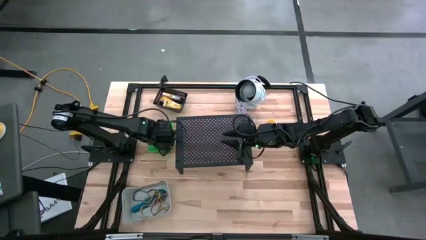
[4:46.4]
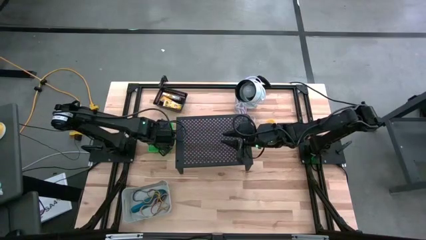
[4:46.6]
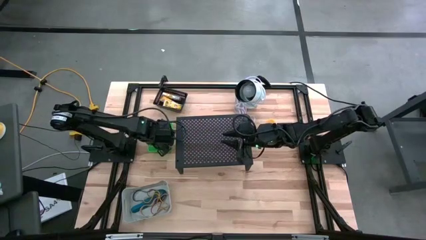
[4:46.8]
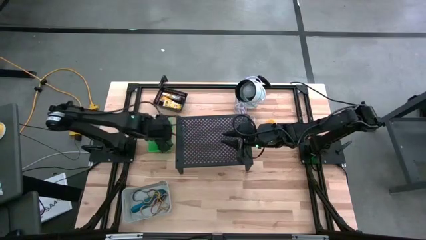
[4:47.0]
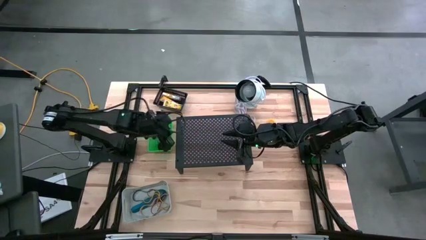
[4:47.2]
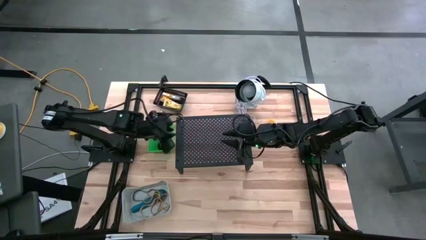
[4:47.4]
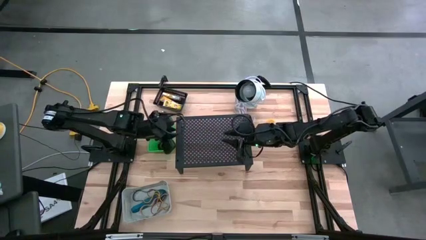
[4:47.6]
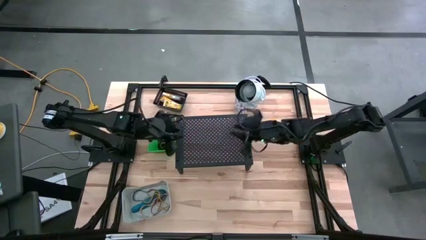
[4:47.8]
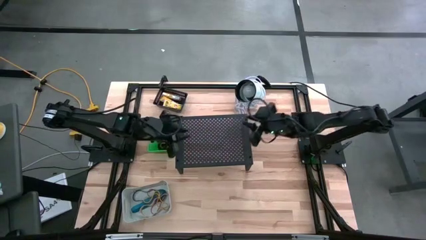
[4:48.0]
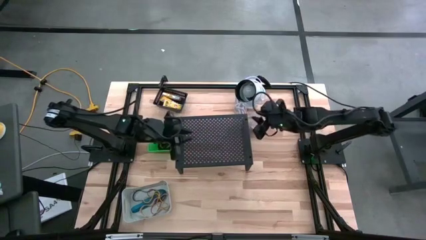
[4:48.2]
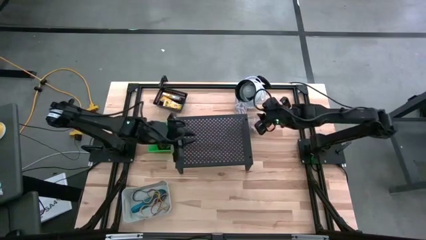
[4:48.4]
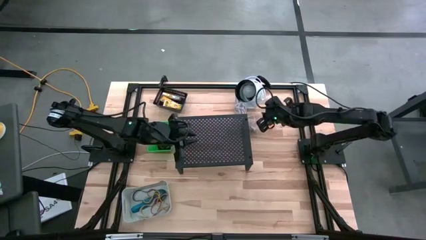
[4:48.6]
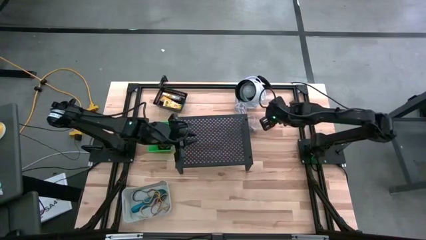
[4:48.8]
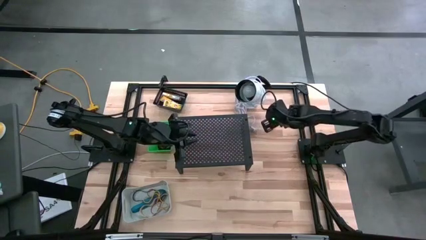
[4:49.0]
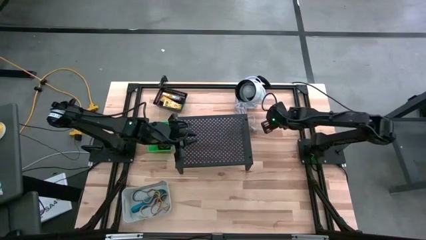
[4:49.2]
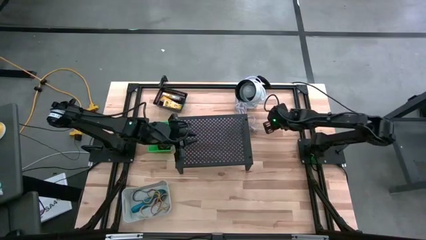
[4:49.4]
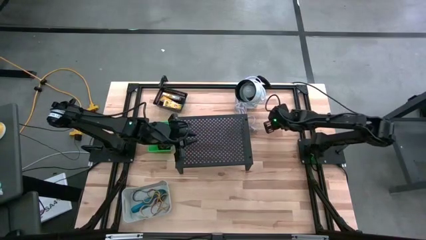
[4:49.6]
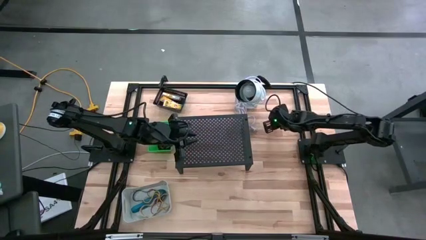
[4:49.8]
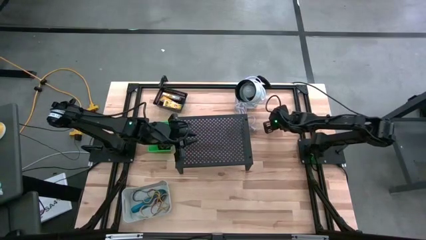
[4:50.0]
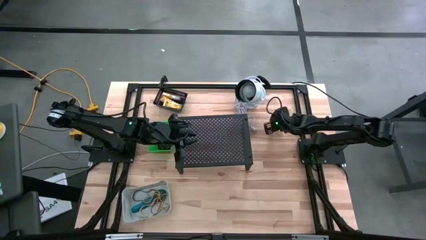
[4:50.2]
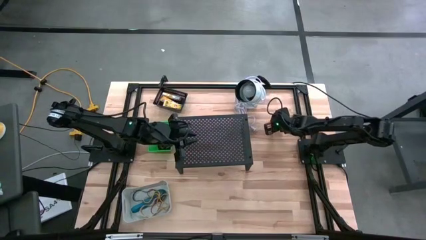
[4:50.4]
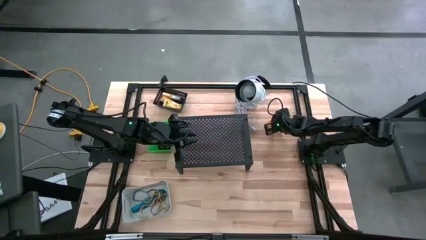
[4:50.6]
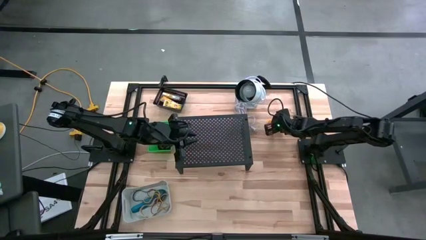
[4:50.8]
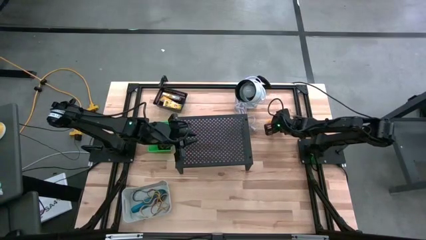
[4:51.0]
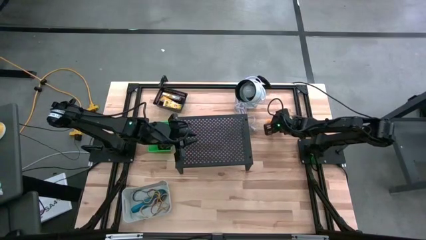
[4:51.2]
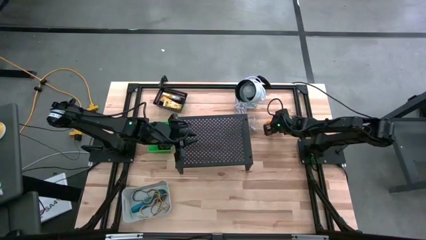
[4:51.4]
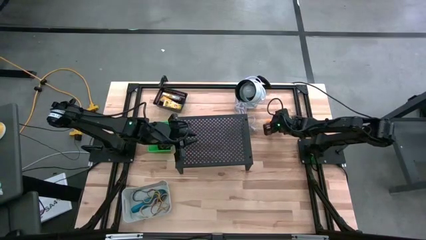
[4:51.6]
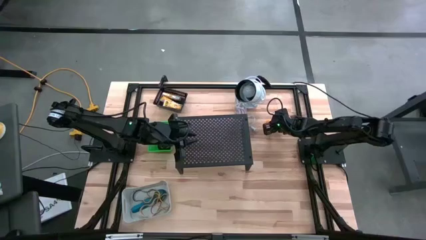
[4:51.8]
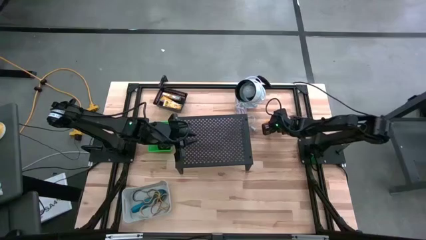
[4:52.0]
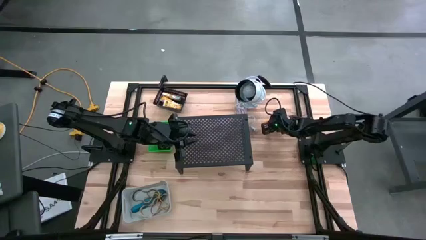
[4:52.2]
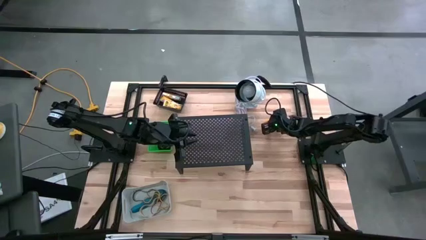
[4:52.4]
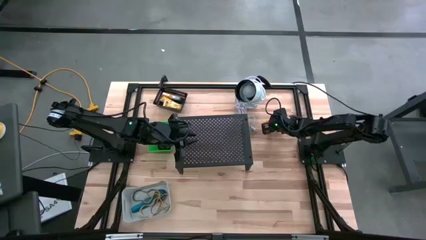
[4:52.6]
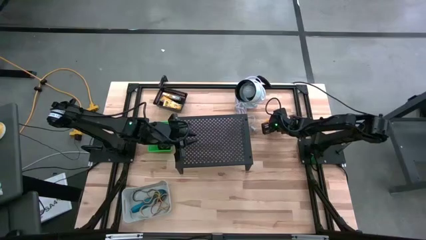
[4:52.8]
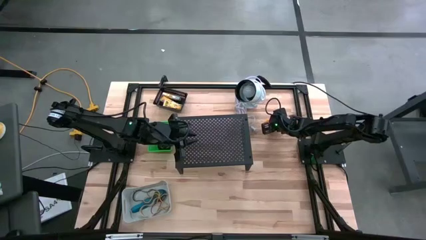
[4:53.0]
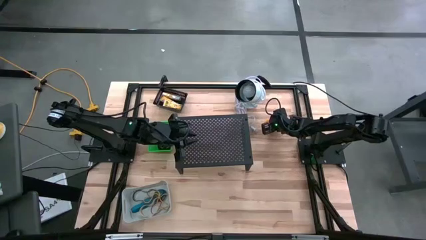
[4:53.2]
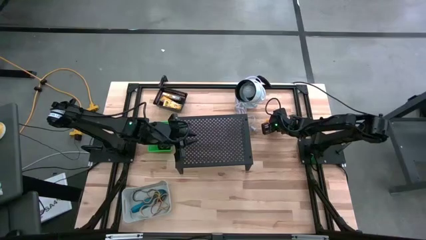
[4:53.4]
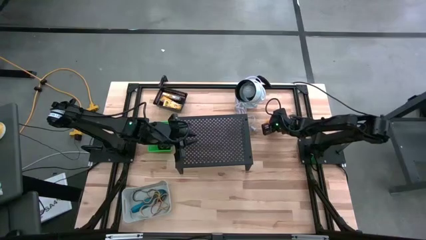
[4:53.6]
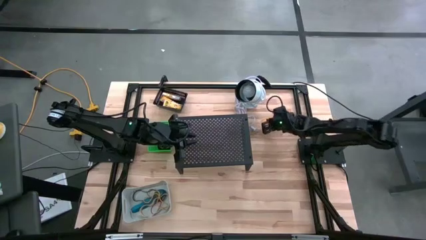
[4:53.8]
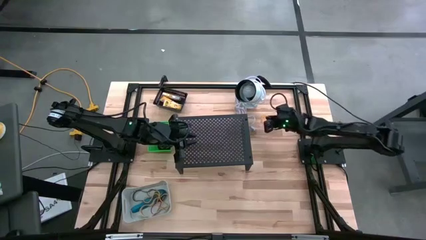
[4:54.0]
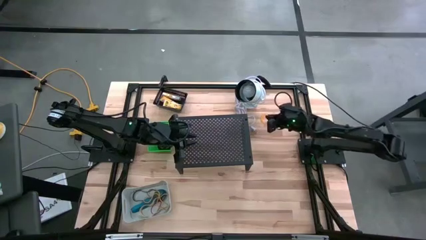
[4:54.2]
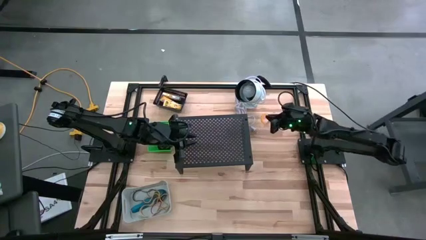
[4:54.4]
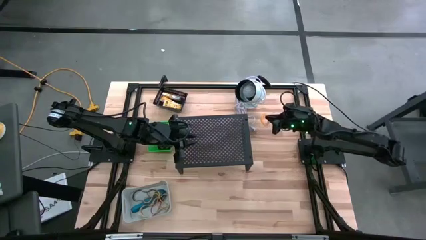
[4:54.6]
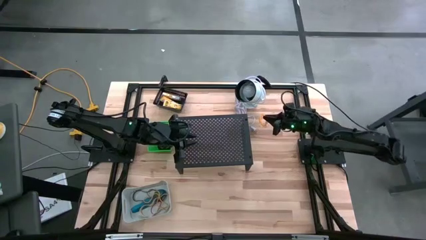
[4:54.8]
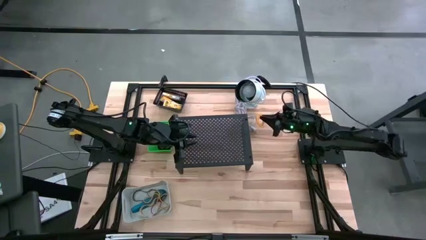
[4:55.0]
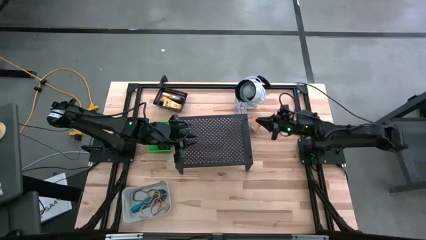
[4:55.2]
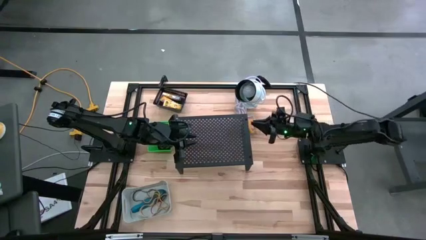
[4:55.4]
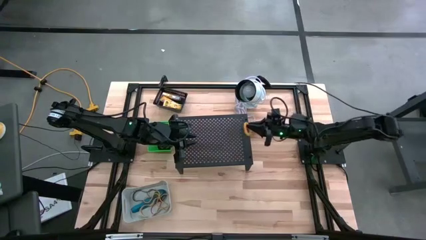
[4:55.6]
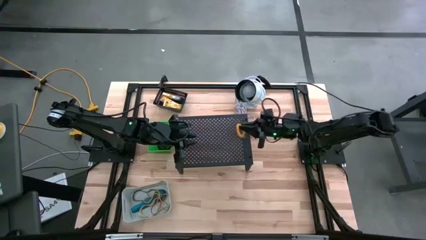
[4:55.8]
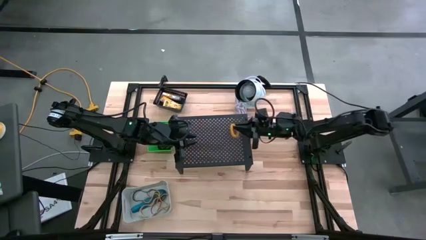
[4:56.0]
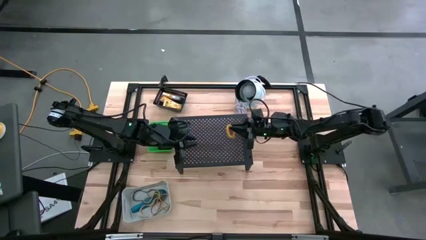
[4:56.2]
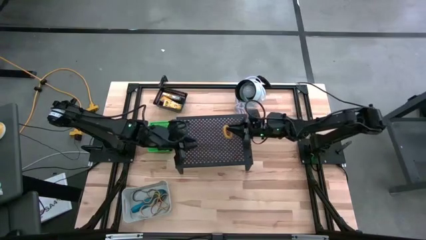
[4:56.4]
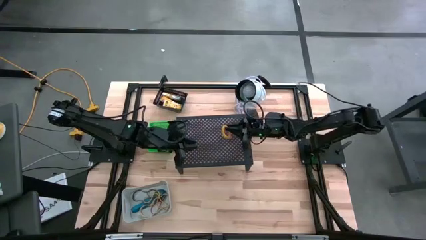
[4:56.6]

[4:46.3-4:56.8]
Task: Pick & Place Office Desk Supplies
Put the yellow spring keychain into the green bin

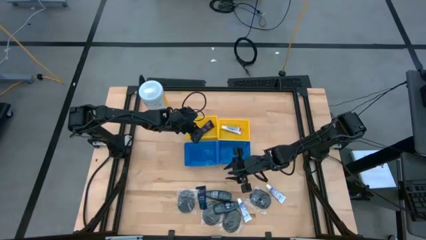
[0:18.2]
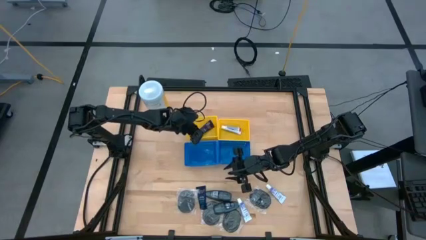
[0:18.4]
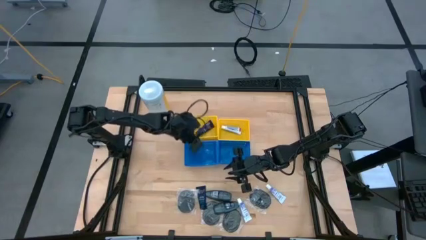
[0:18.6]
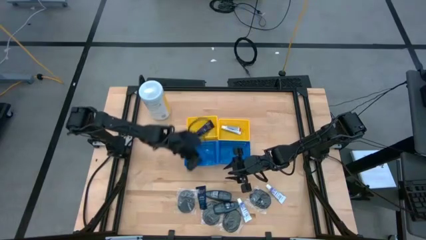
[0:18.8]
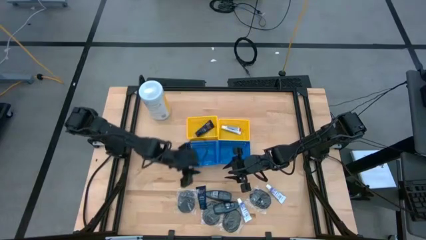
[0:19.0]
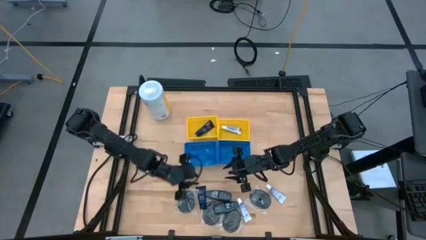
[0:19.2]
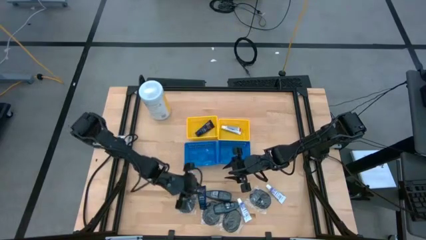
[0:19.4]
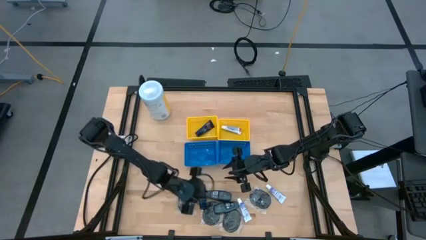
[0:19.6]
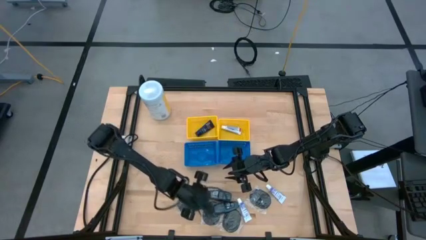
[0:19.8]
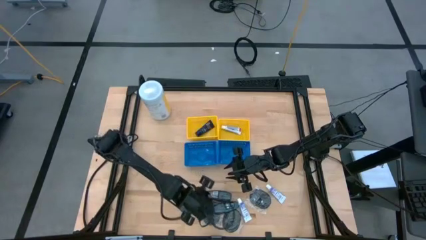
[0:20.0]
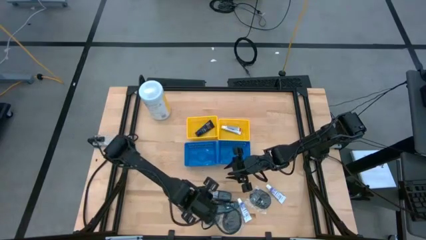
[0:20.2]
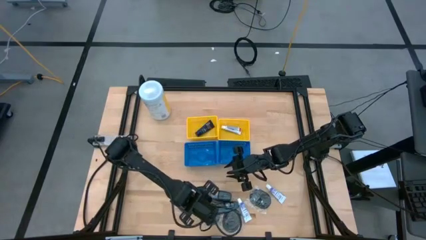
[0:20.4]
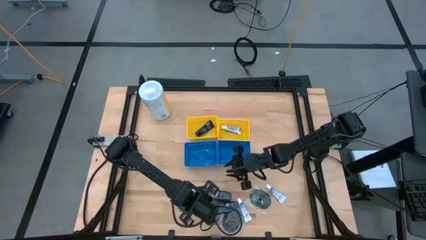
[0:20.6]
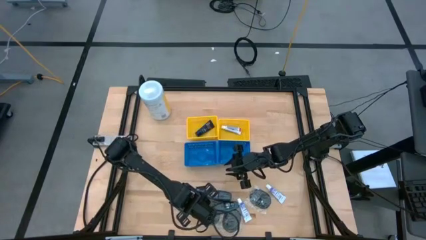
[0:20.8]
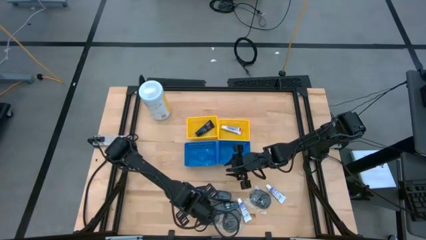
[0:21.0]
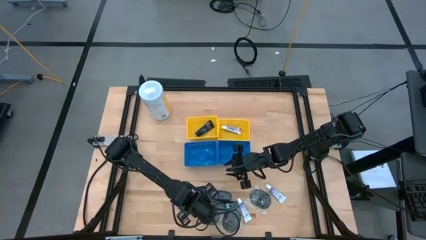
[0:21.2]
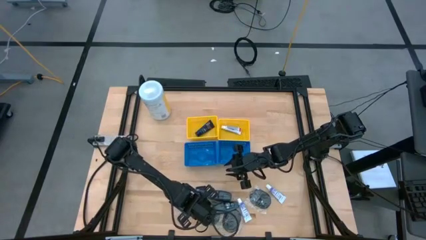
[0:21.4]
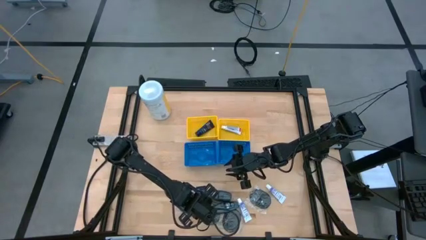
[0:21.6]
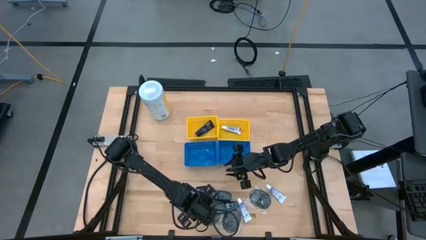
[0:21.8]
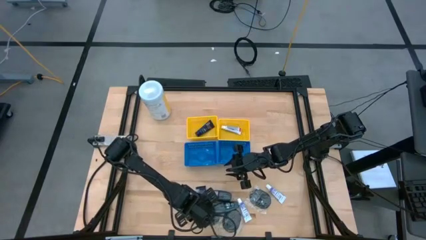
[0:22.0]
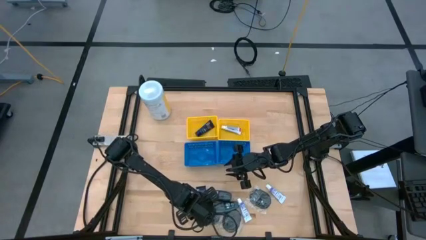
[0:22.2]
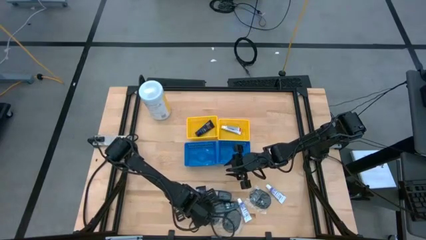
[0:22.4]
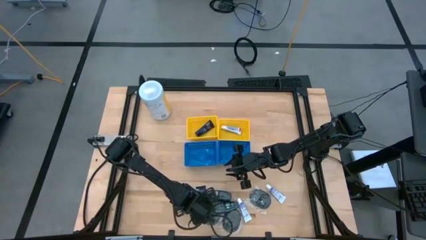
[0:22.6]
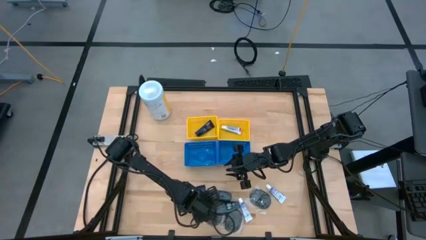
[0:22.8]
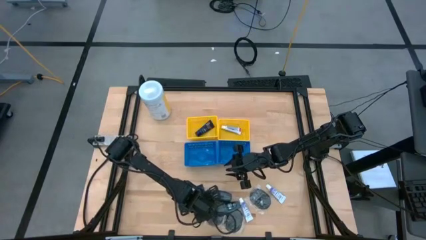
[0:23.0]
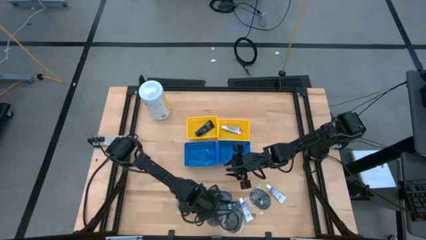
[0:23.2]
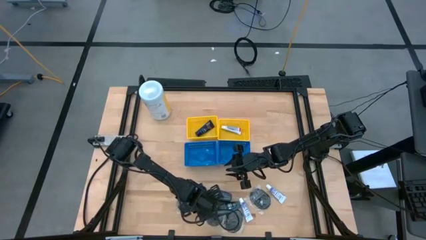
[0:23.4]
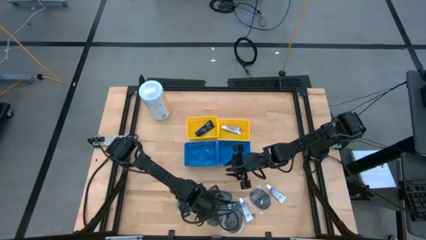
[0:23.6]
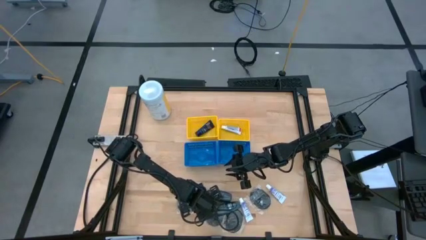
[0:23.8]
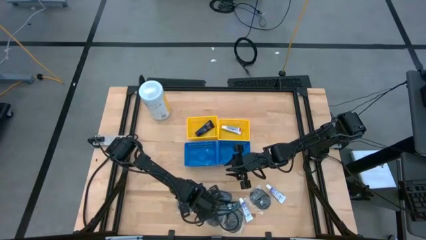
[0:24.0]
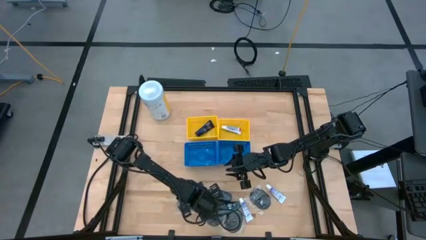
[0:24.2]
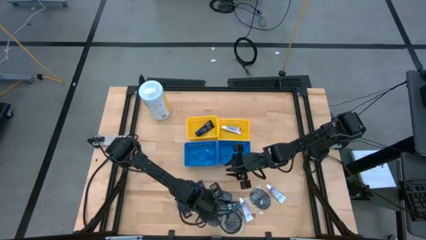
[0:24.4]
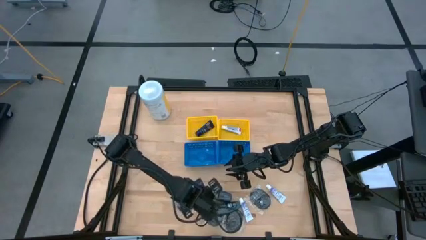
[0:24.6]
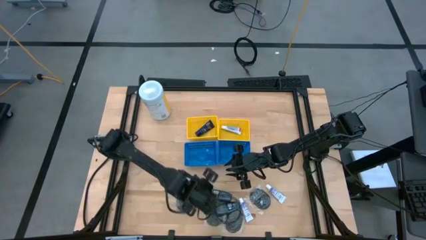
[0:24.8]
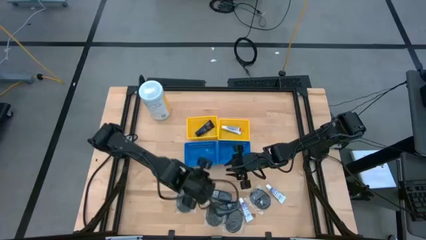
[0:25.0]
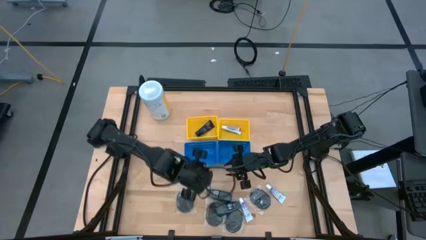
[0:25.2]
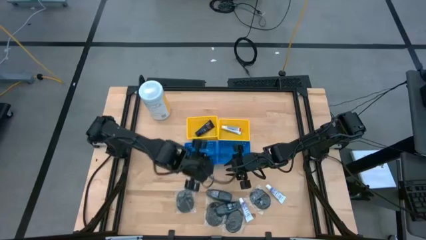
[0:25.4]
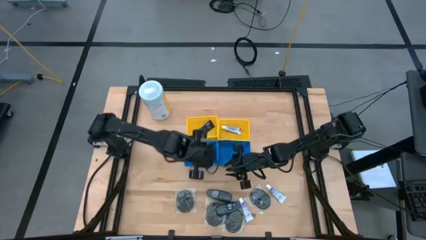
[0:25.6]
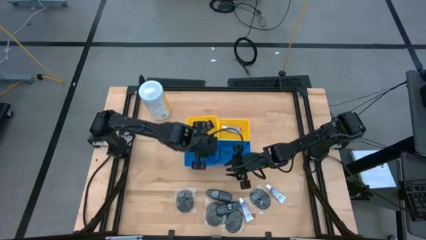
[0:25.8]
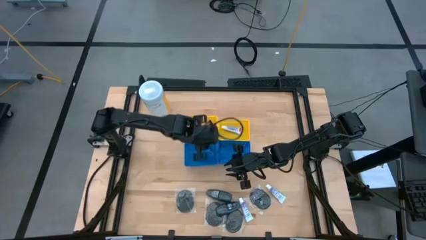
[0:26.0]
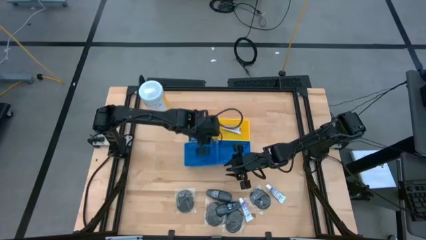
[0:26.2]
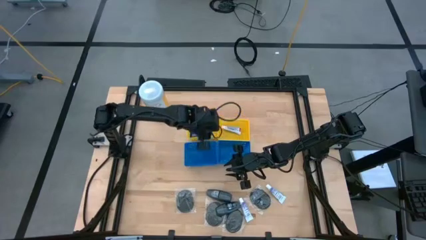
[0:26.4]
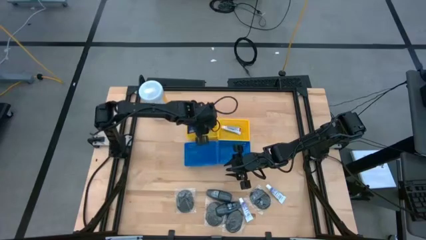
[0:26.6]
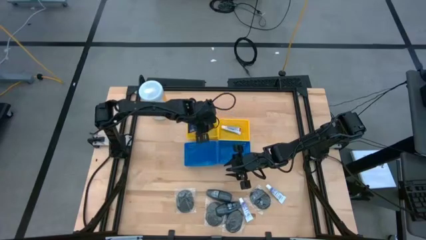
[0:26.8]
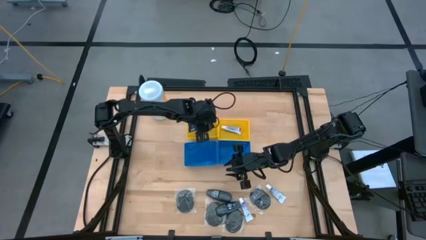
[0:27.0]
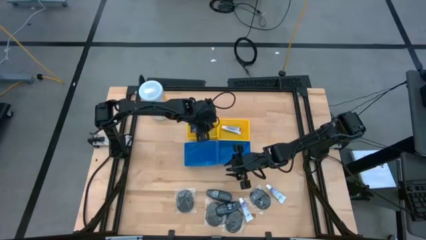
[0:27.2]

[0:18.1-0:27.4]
Task: Pick & Place Travel size toiletries
Put the shave cream into the left yellow bin
